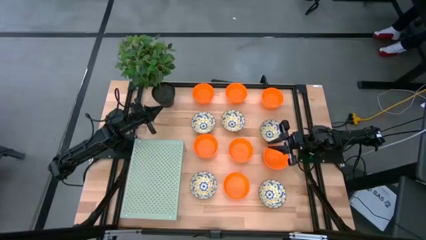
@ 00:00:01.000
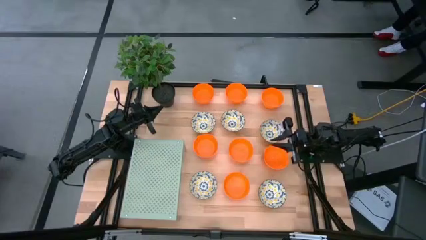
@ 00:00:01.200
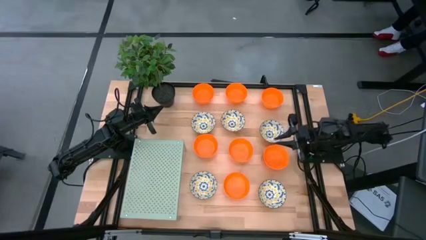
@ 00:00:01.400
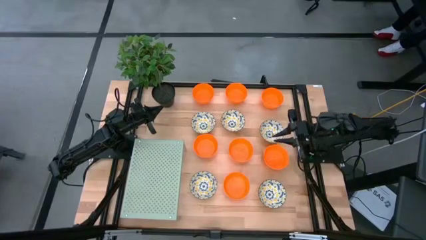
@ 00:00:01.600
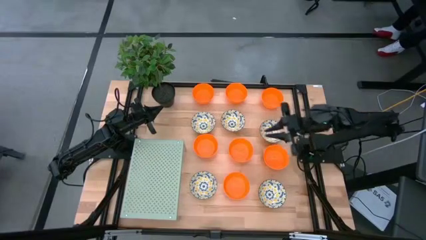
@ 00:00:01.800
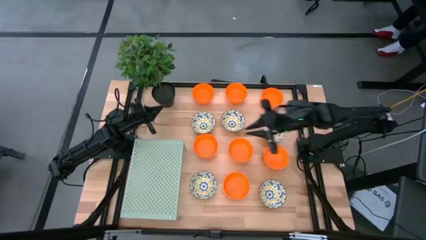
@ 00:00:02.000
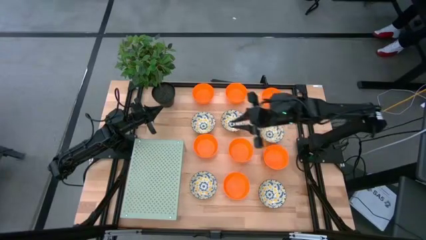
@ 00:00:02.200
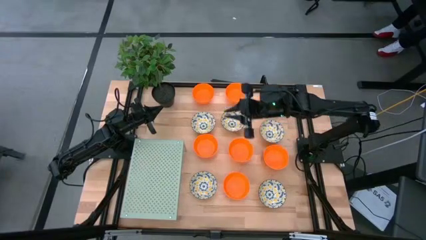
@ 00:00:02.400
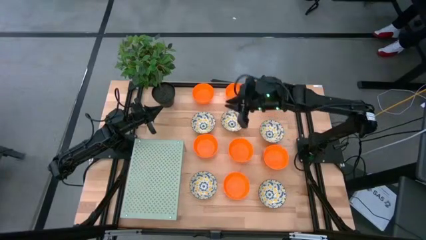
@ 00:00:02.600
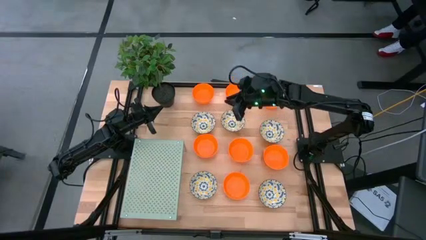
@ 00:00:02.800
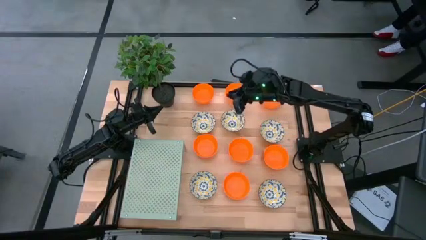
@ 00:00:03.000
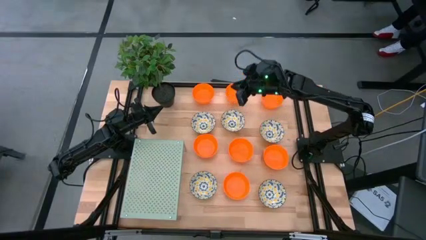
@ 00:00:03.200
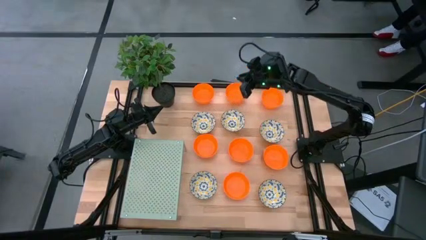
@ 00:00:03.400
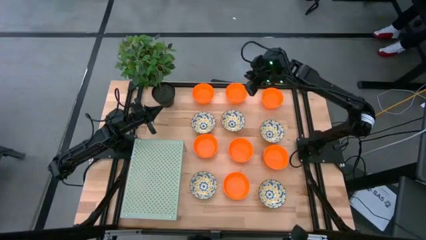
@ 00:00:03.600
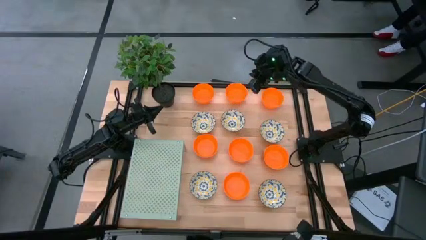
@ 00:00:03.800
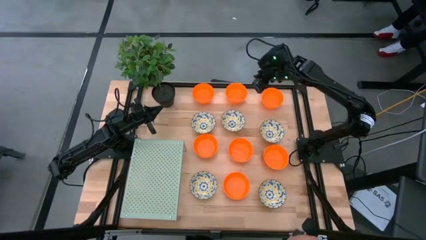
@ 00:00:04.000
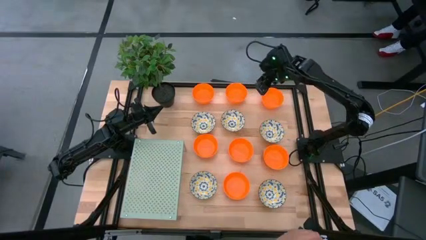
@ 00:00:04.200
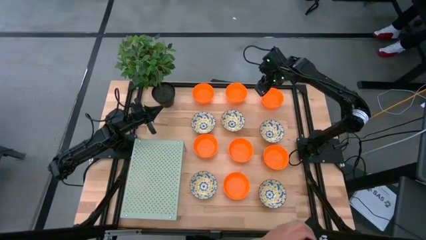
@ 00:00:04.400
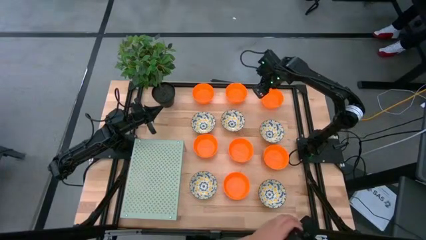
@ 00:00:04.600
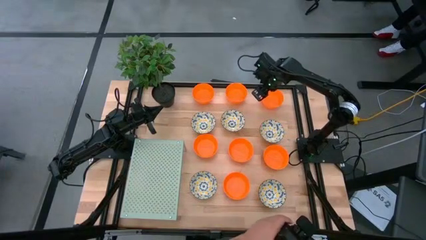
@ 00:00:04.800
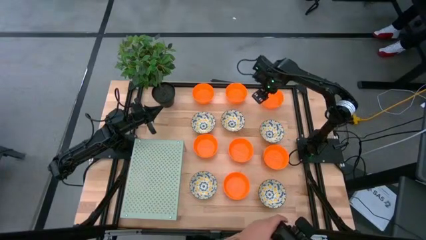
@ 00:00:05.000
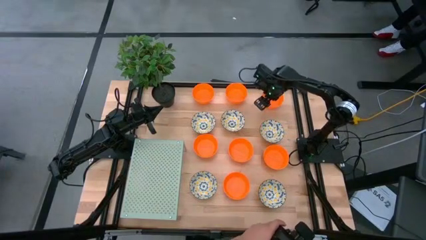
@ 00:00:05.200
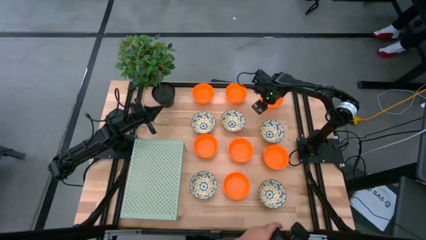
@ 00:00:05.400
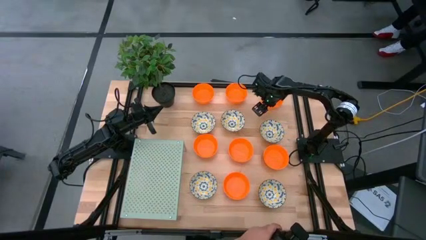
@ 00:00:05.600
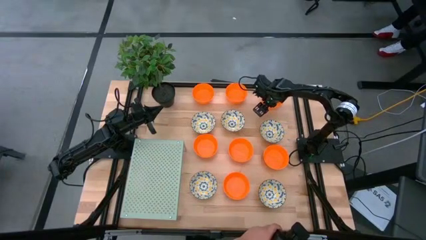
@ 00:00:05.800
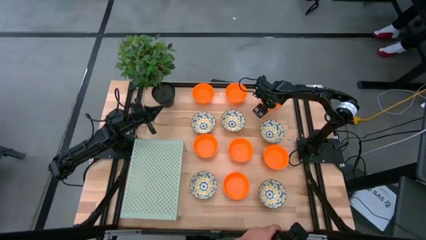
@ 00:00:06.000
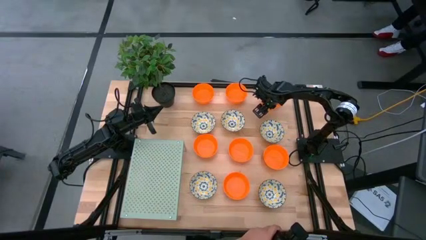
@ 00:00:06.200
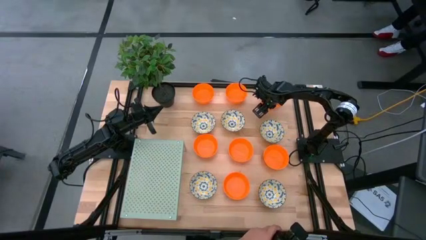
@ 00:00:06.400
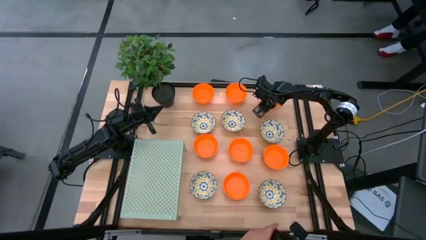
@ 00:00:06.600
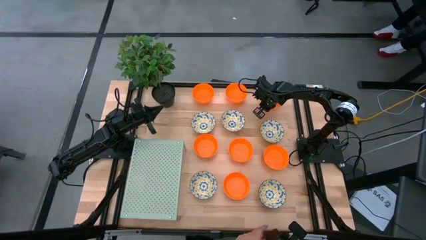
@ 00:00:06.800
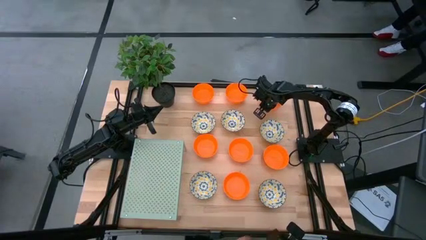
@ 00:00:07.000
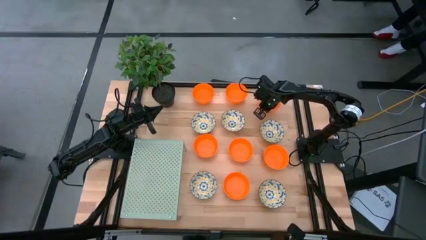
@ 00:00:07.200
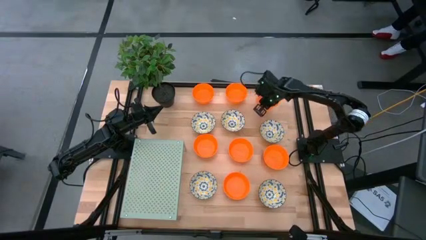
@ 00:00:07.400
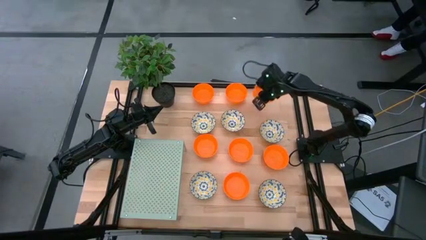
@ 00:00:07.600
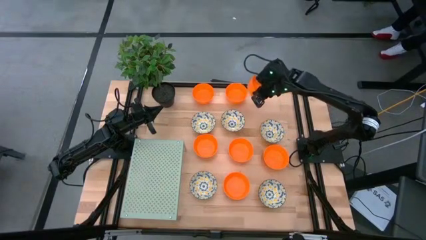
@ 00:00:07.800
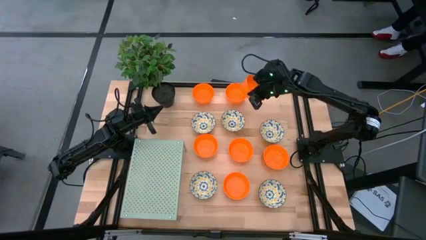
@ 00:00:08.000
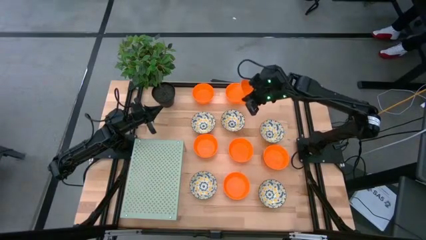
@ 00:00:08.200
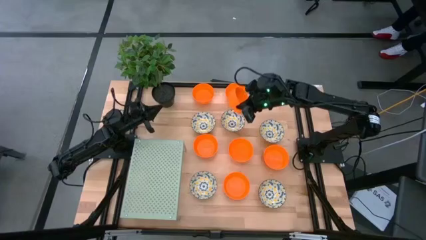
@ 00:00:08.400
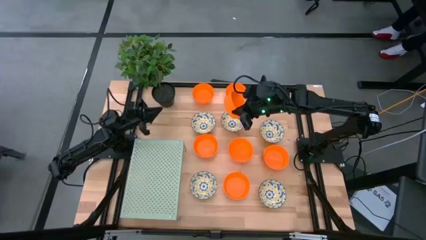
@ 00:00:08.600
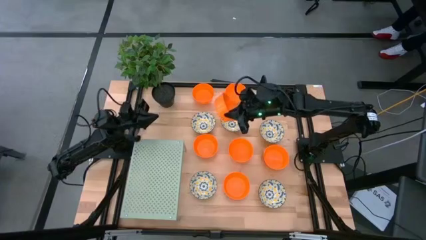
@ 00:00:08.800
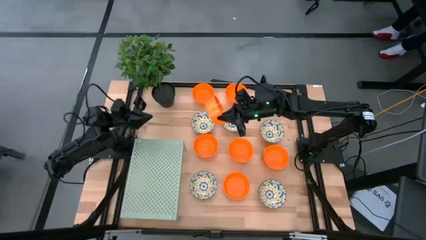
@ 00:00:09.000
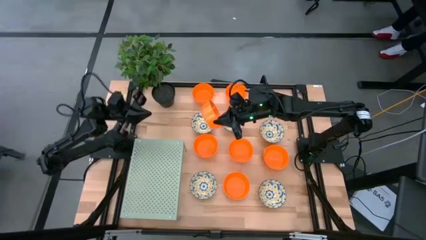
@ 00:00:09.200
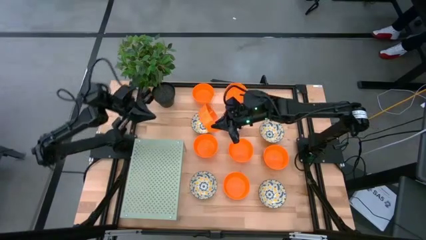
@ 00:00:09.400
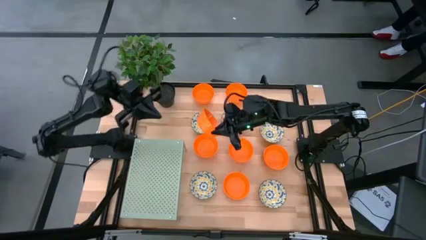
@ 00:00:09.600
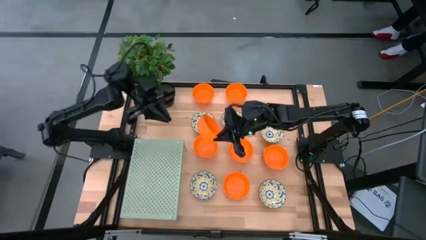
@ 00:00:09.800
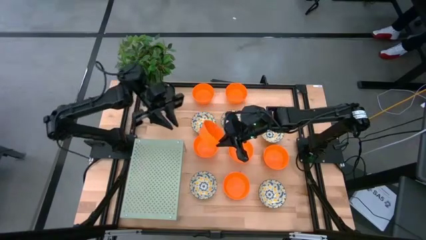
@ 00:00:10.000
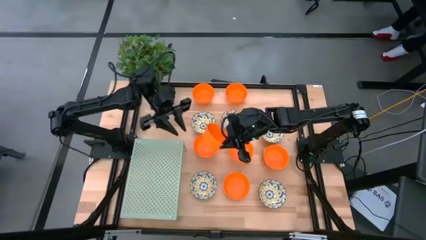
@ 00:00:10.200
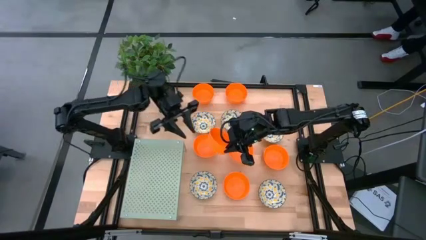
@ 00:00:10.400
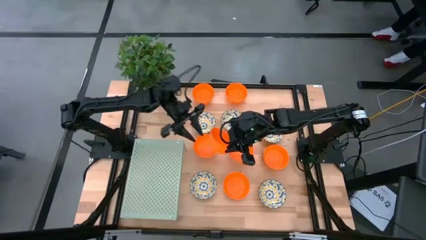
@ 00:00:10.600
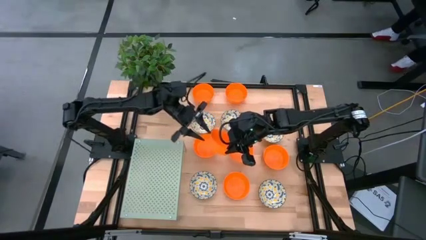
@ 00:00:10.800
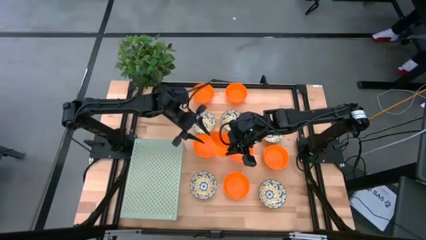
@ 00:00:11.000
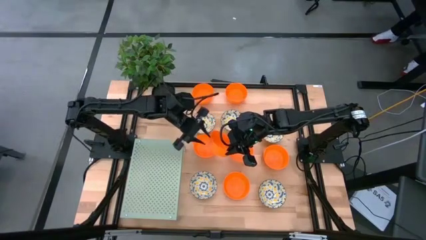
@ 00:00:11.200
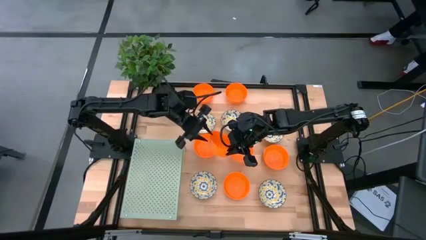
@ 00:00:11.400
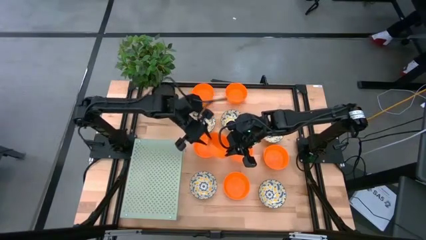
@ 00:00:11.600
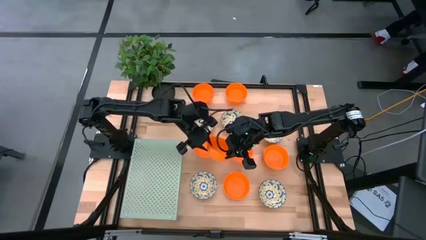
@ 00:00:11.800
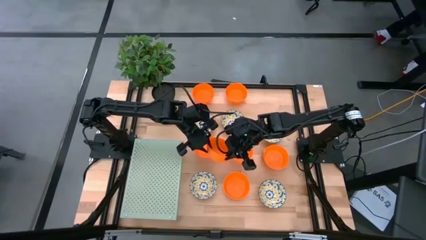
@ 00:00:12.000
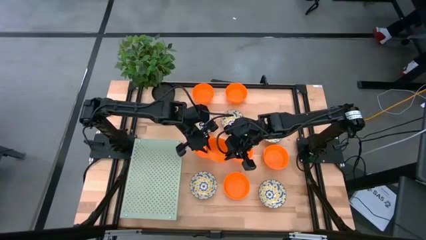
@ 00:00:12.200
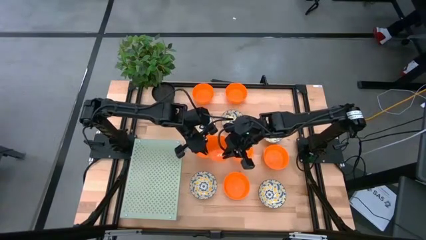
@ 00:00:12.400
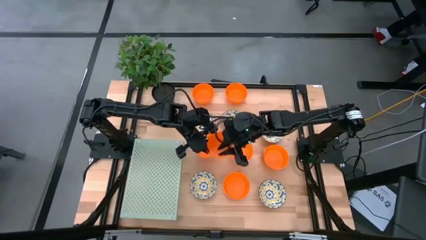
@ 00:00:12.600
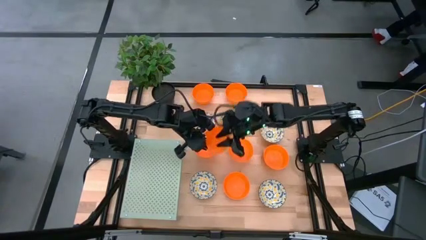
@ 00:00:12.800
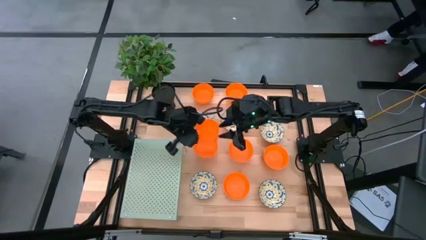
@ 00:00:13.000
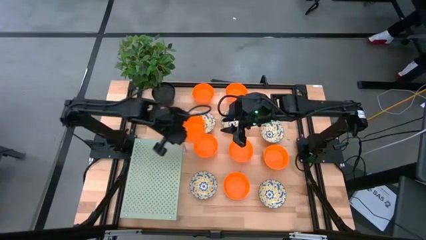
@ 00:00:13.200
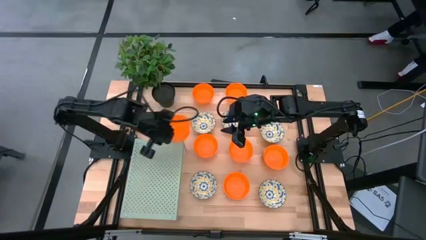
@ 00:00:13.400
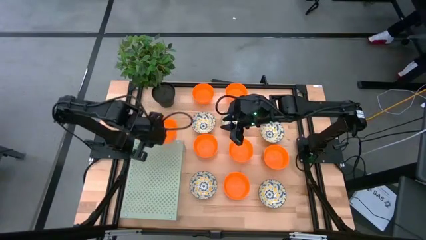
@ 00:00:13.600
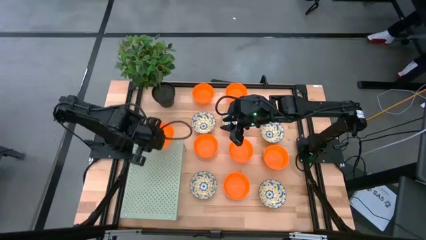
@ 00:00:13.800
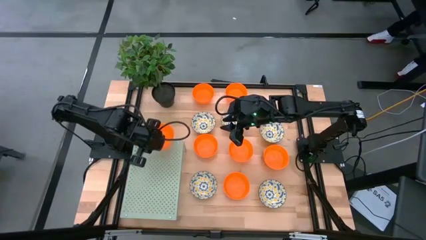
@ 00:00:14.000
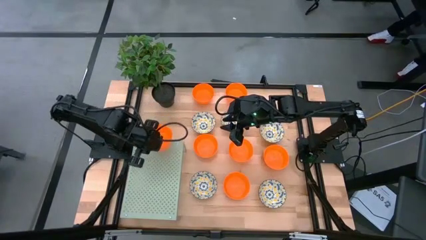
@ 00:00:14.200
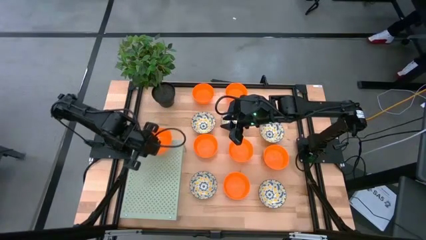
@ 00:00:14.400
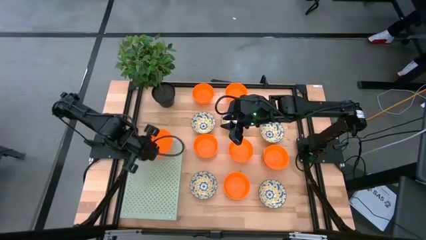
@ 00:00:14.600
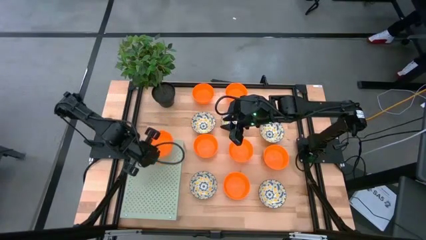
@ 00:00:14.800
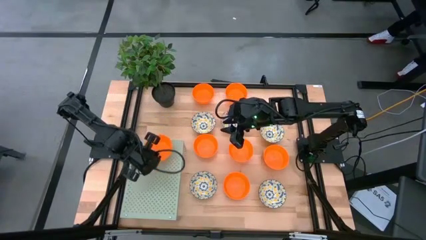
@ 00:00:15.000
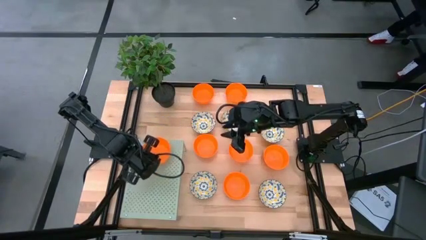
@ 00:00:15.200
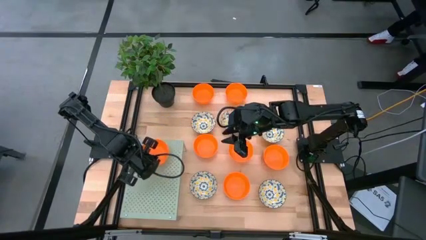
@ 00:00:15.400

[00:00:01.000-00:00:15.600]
Task: Pick & Place Mini bowls
Put the orange bowl on the shelf
